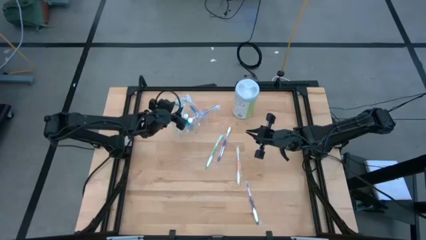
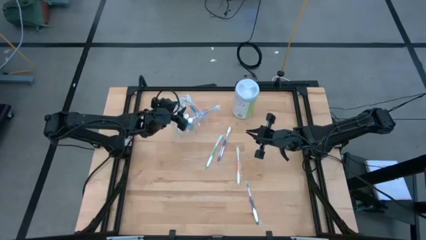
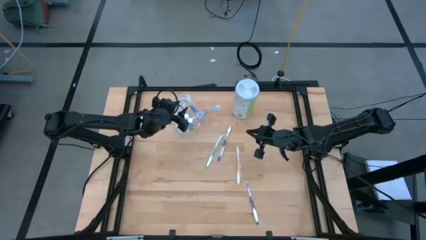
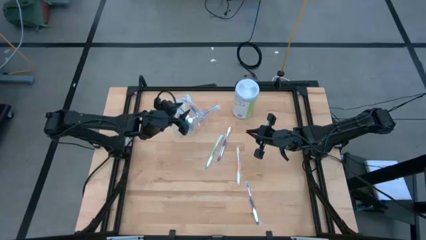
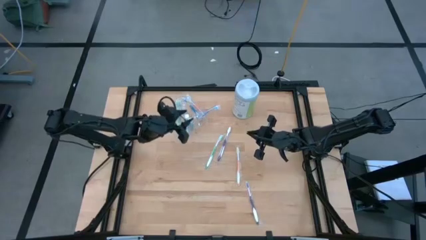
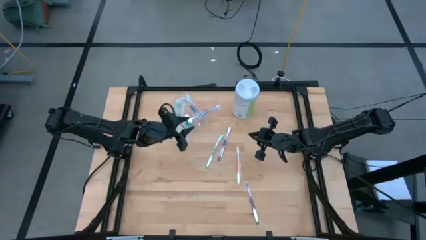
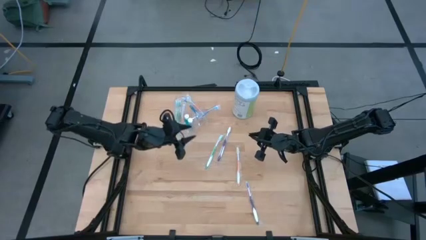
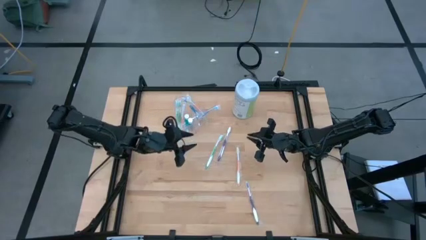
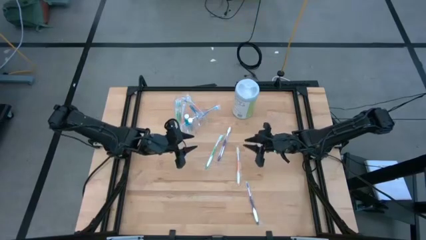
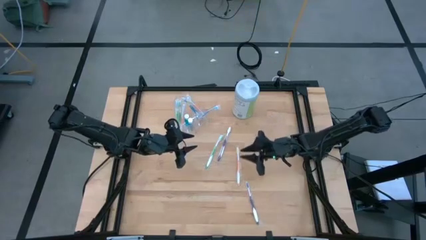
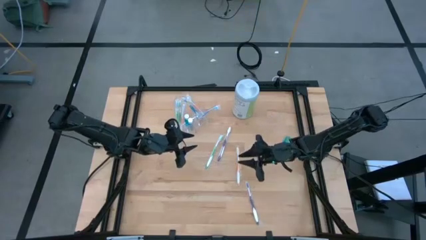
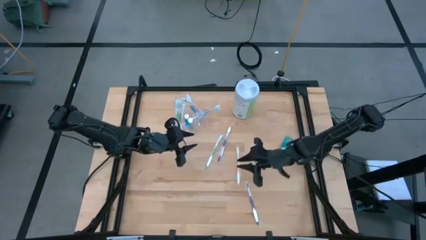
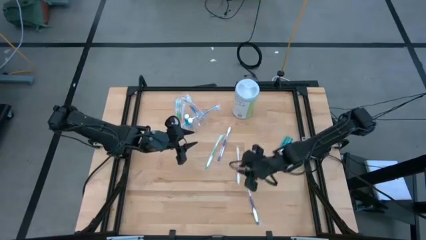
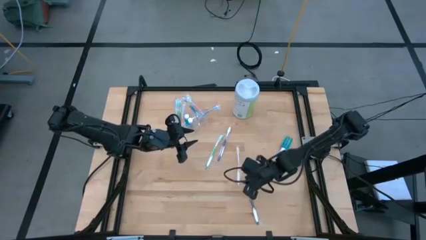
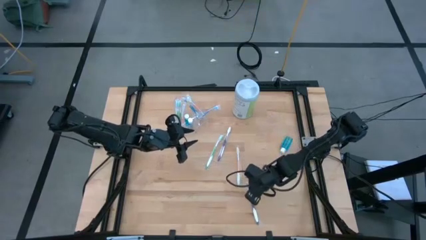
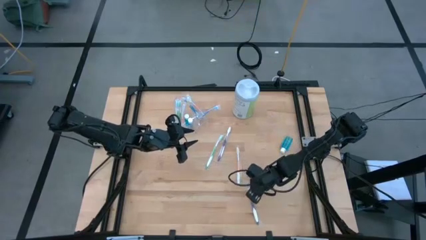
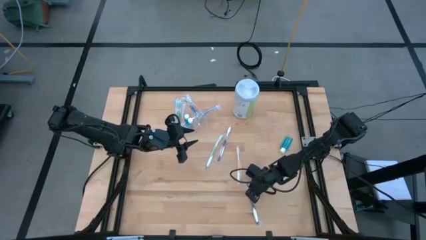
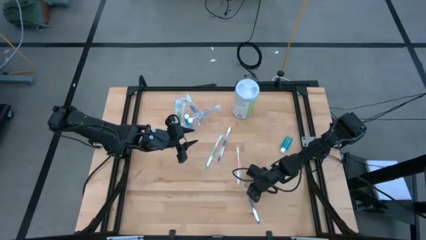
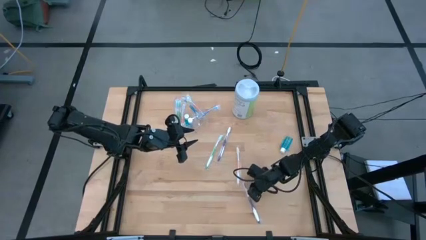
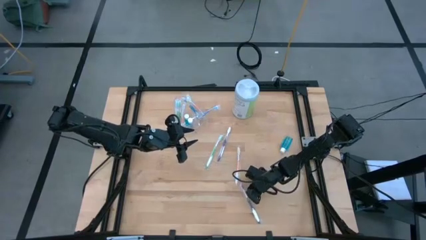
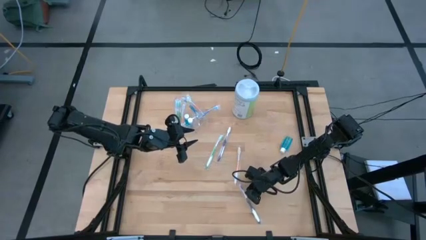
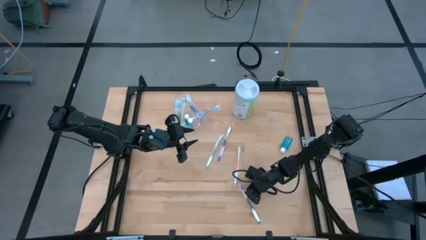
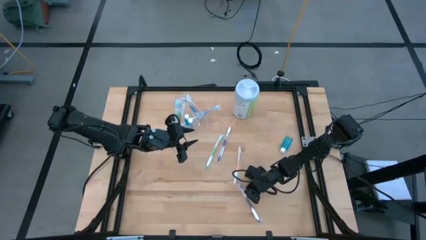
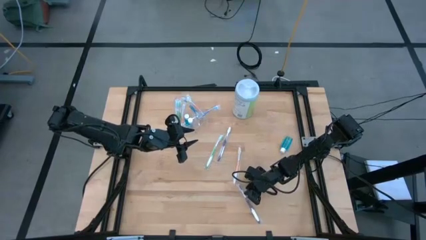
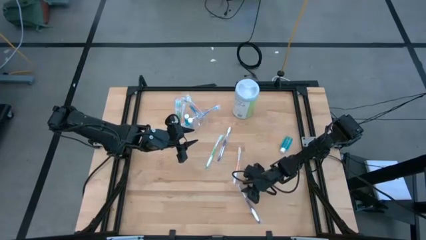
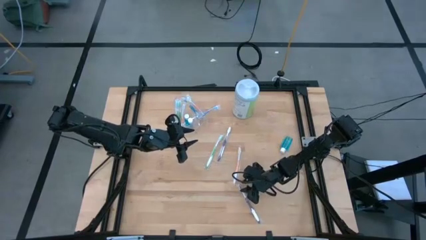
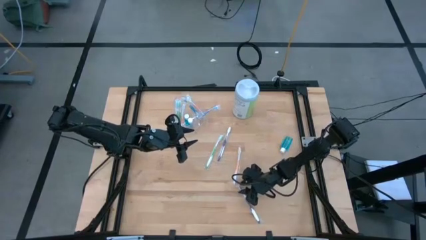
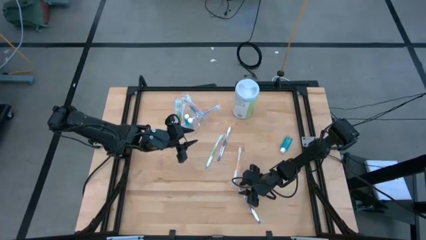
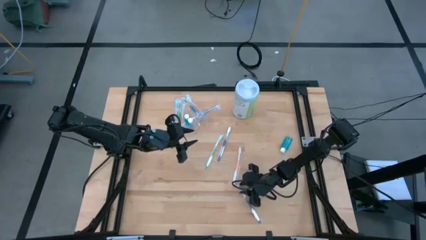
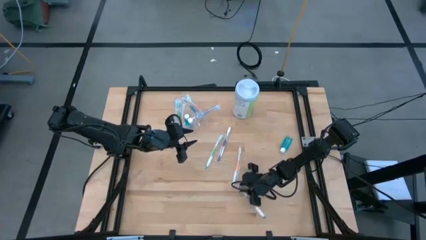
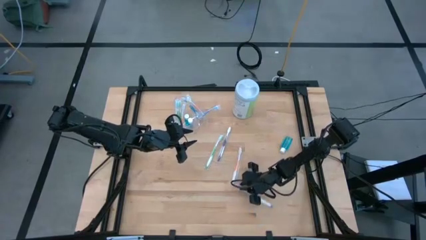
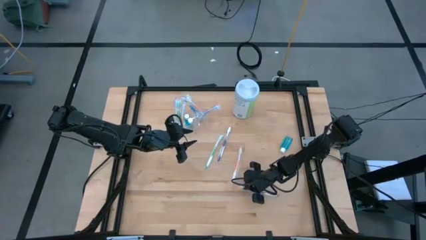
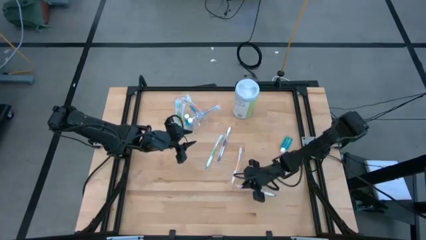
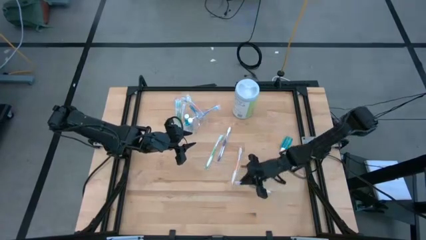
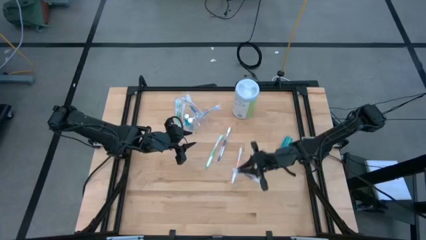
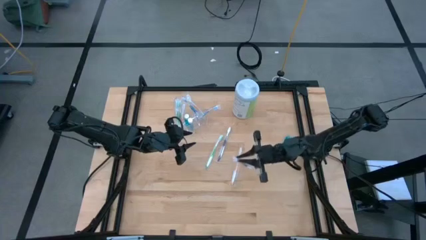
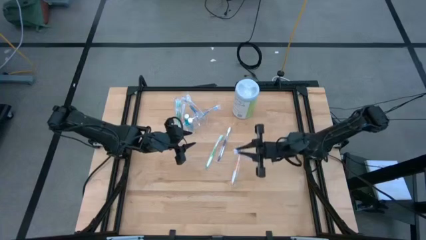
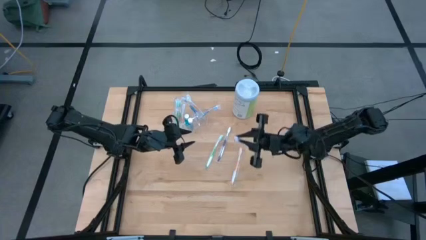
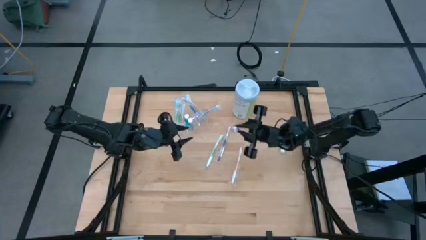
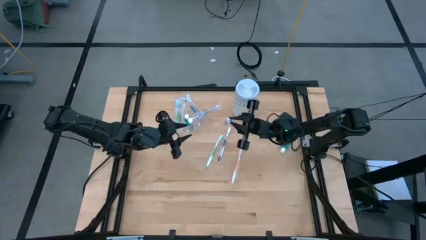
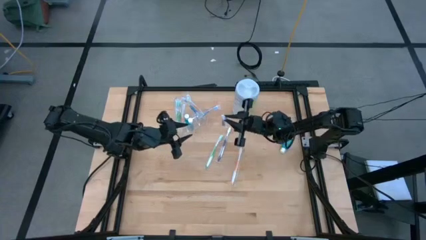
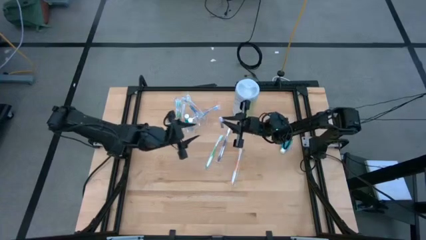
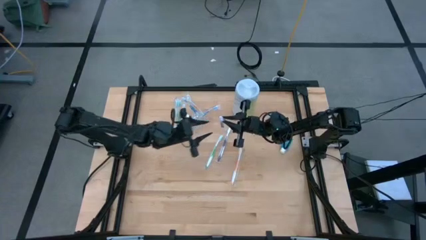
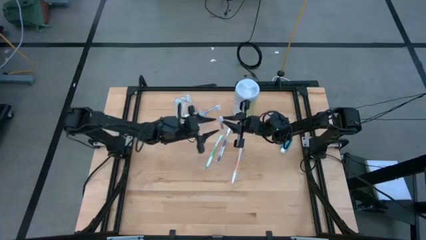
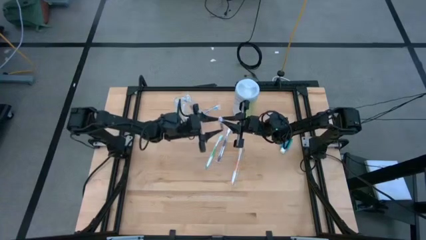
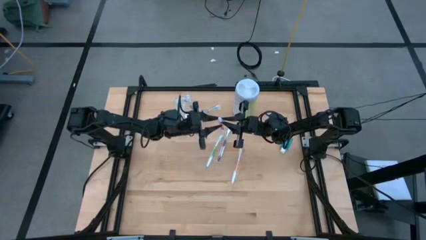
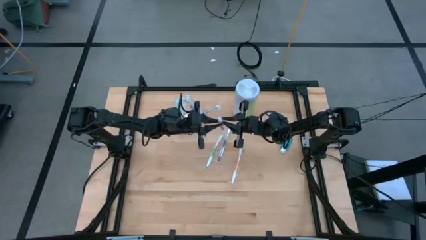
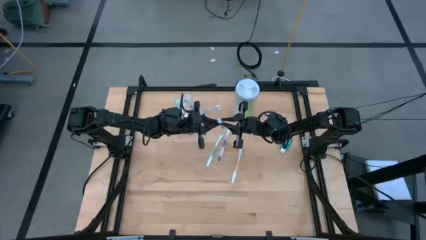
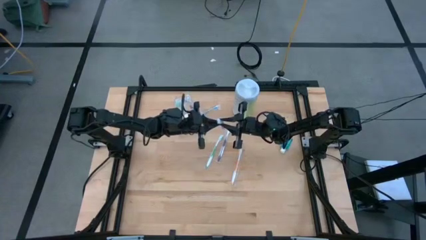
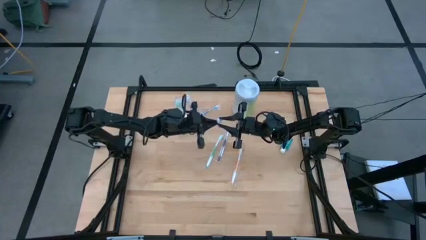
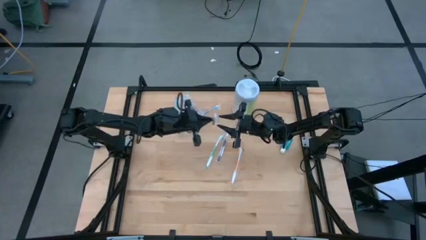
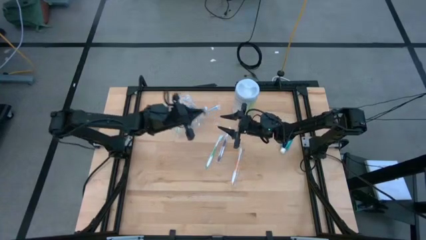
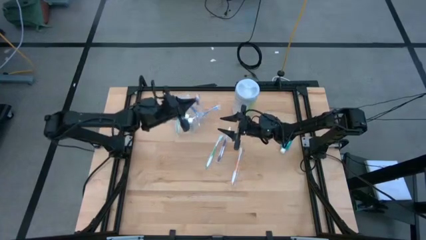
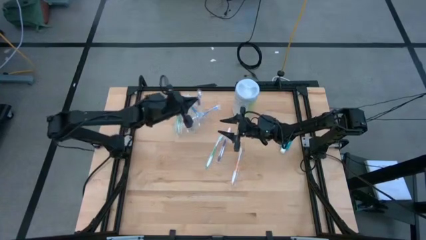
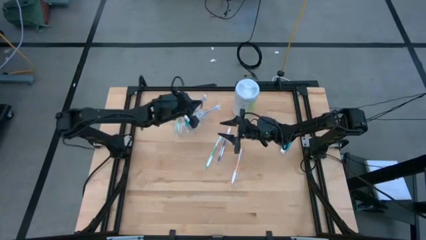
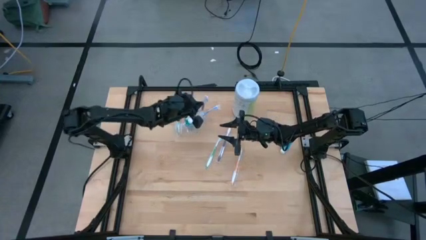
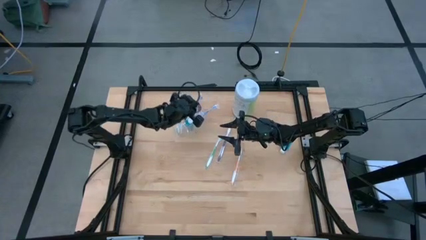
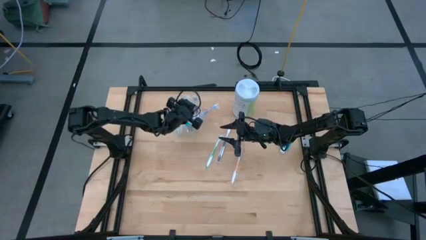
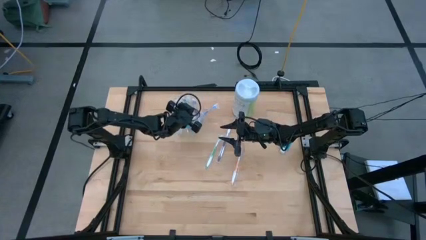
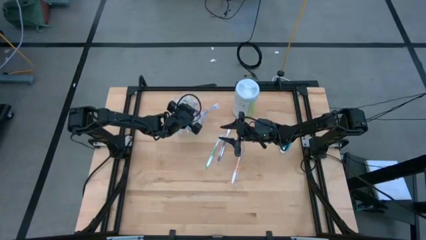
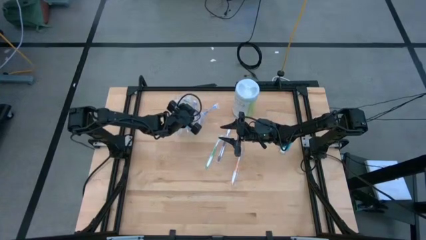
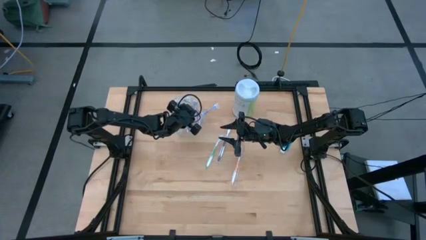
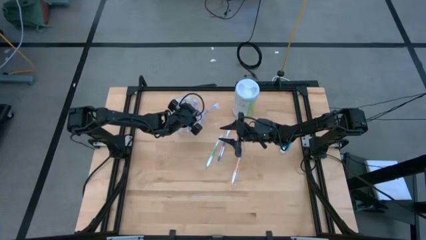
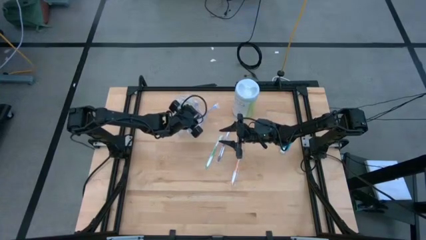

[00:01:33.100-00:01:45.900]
Task: Pick & Place toothbrushing station
Put the purple toothbrush into the transparent organizer

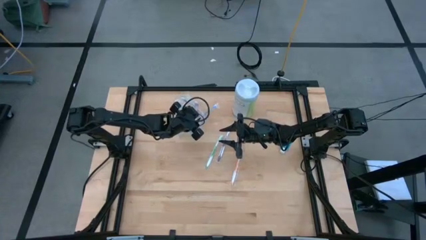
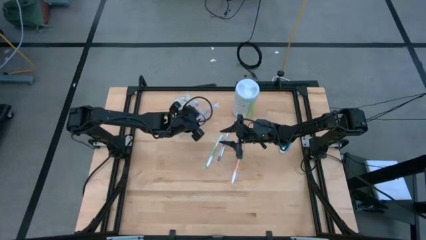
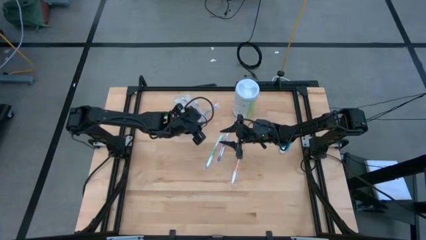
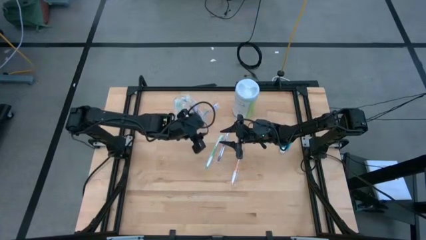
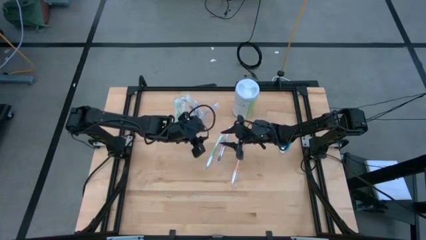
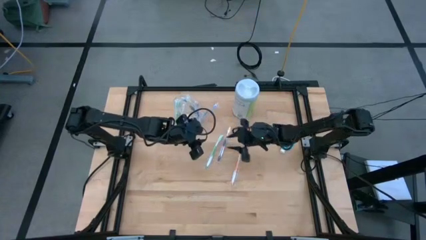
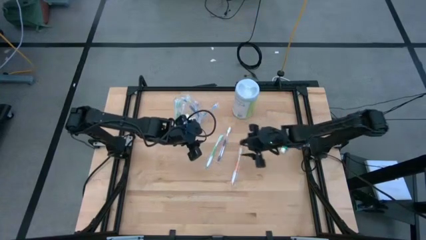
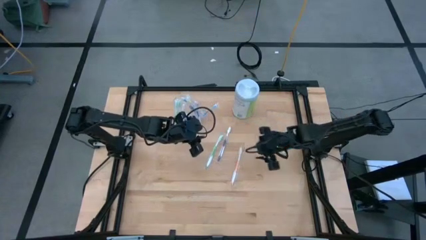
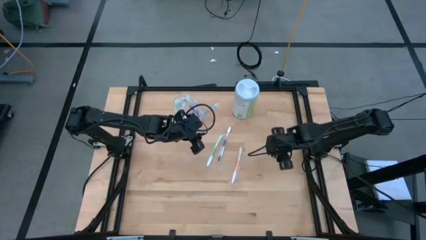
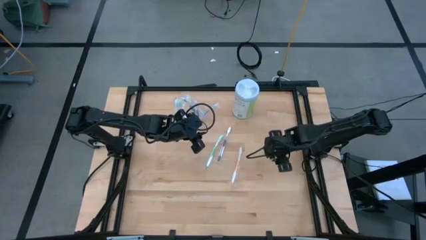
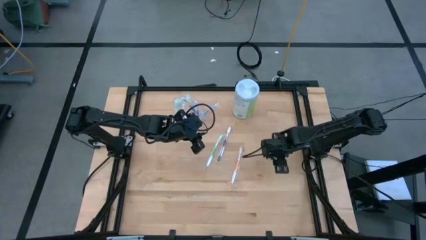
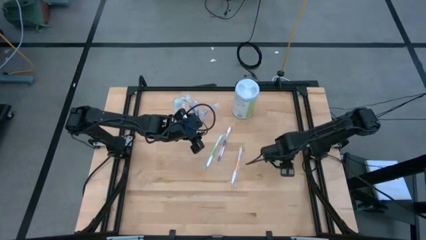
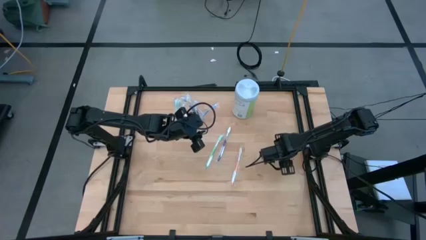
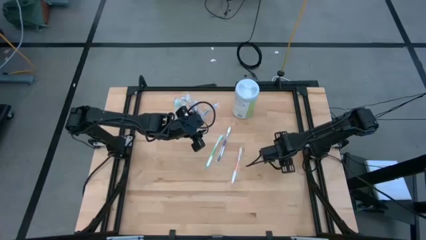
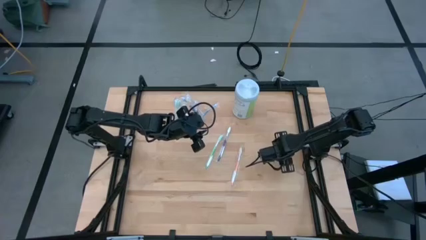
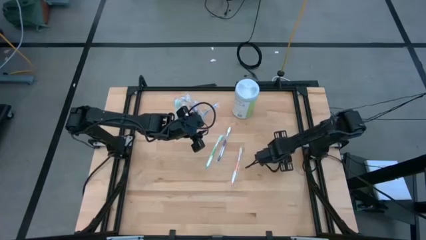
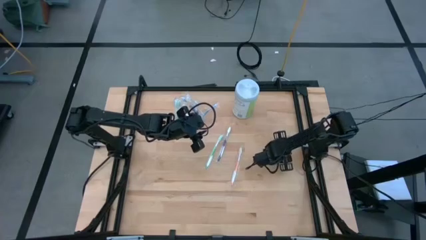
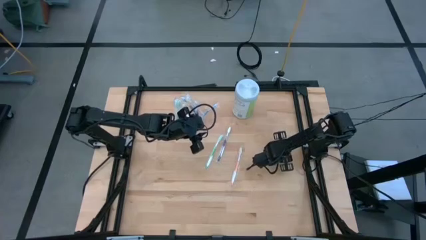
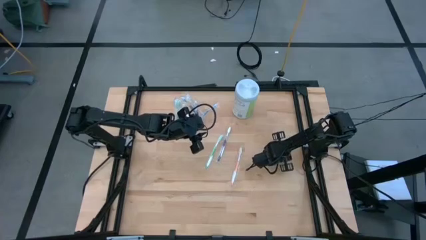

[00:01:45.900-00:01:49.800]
Put the mouthwash into the transparent organizer

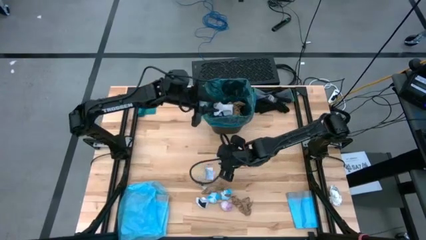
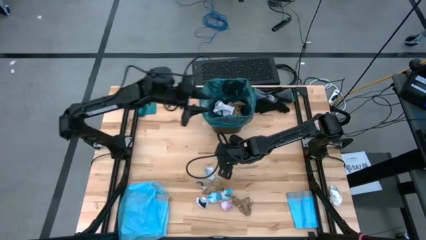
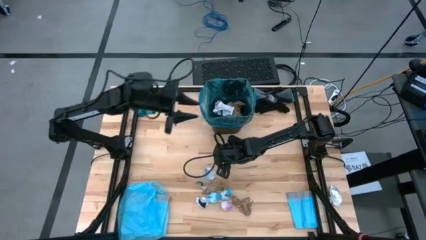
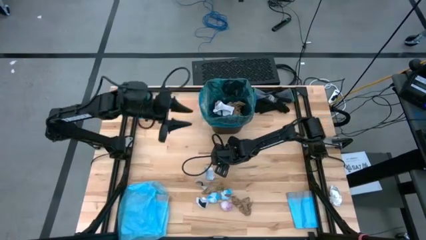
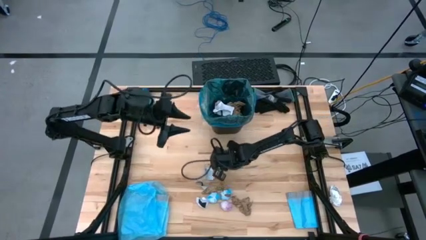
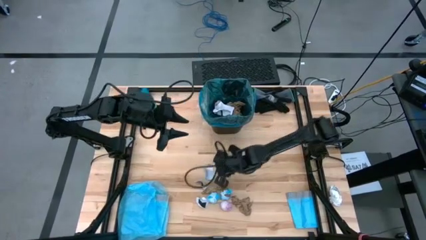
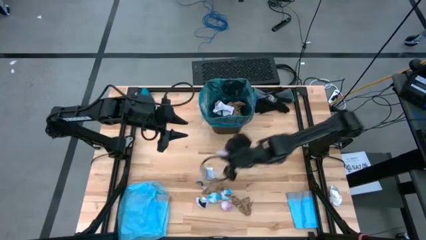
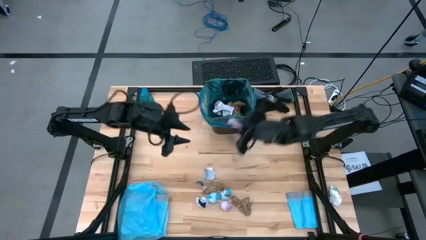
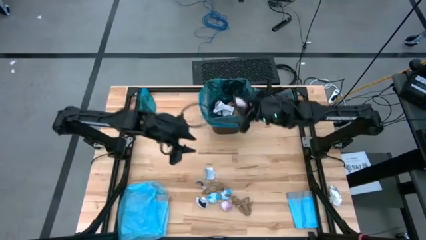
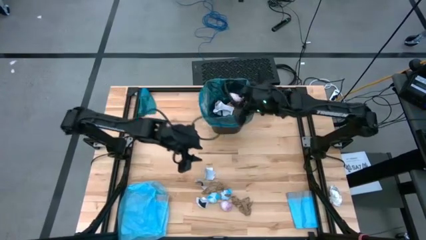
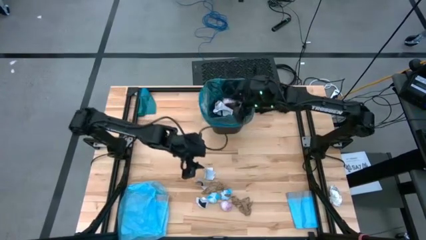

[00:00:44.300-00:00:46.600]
Task: place trash/remove bag and relplace
Put the pink plastic into the blue trash bag inside the black trash bin
